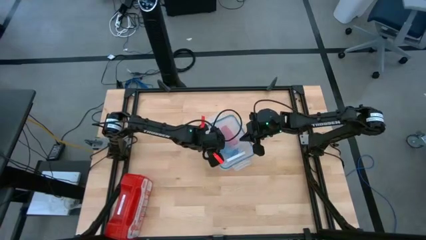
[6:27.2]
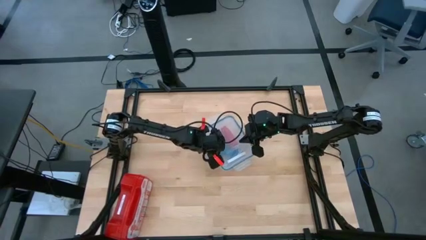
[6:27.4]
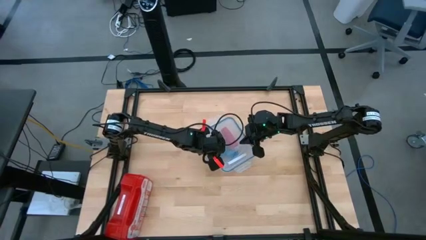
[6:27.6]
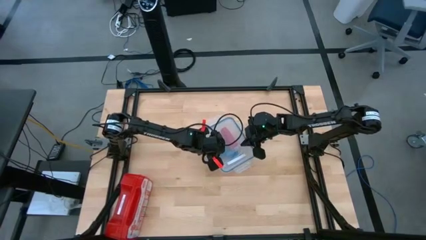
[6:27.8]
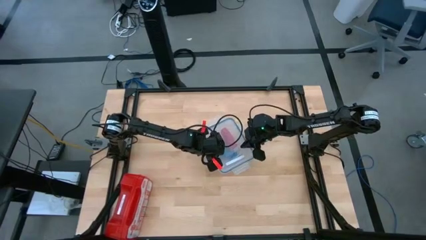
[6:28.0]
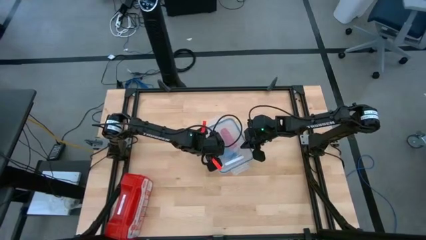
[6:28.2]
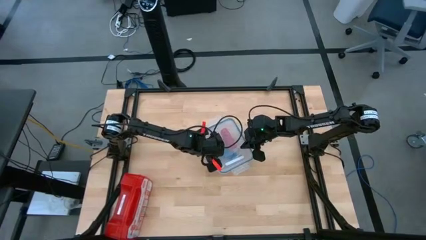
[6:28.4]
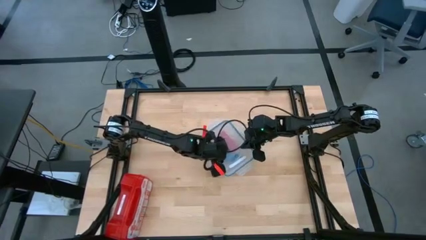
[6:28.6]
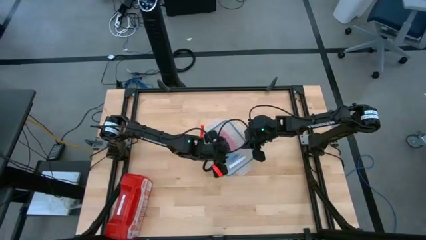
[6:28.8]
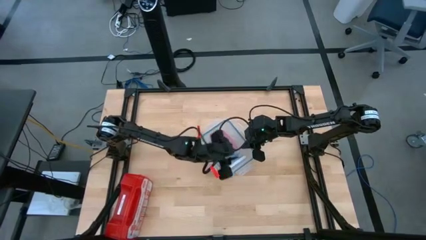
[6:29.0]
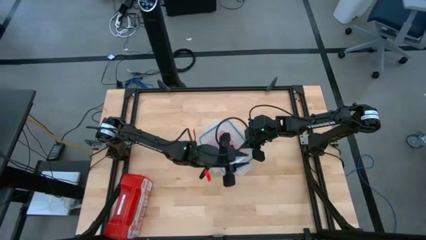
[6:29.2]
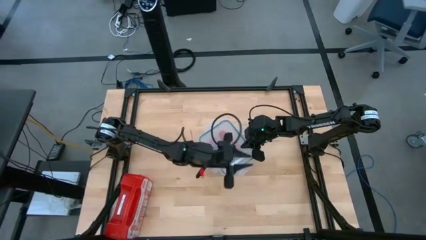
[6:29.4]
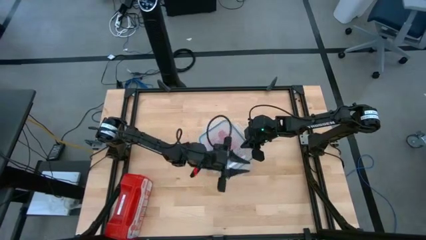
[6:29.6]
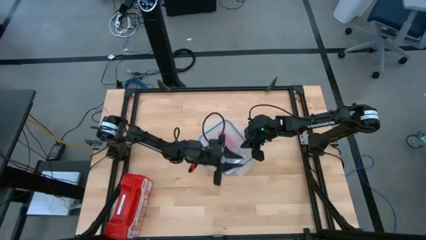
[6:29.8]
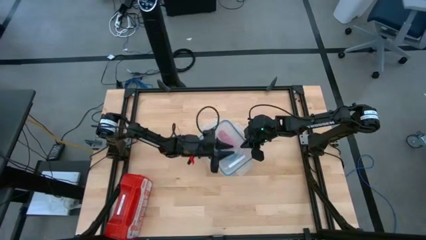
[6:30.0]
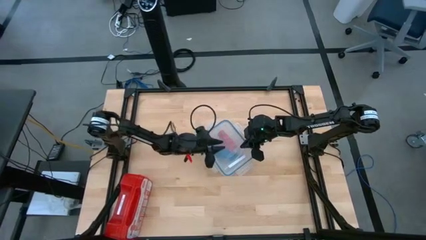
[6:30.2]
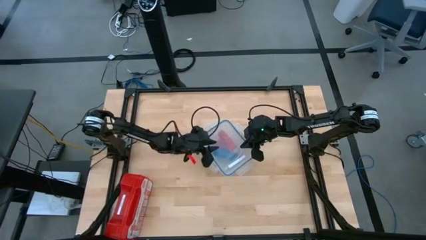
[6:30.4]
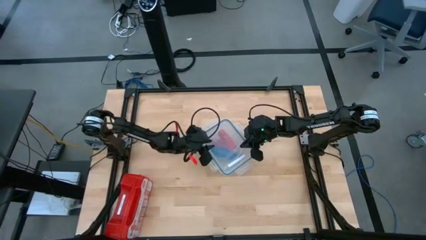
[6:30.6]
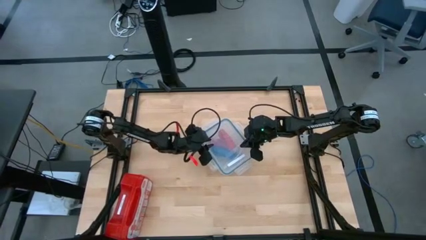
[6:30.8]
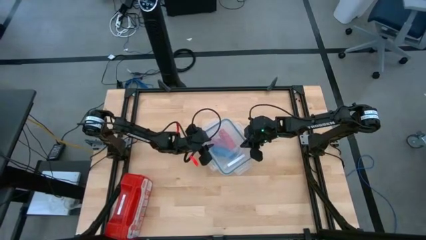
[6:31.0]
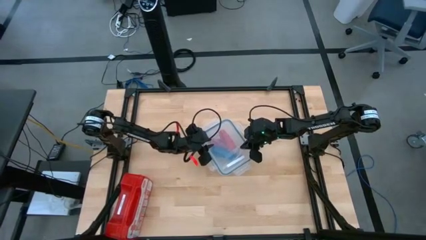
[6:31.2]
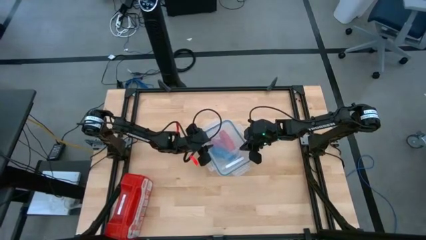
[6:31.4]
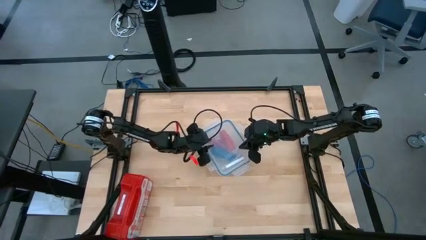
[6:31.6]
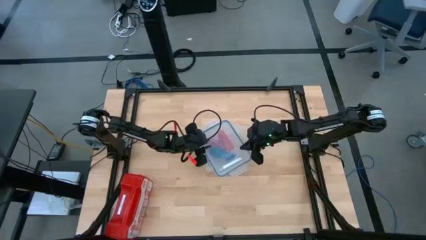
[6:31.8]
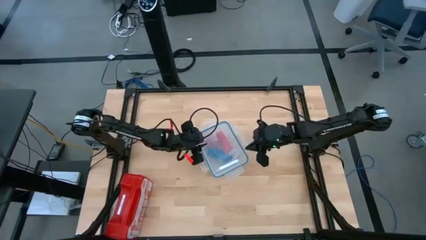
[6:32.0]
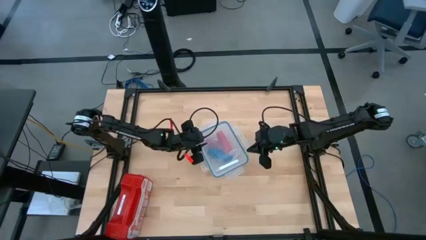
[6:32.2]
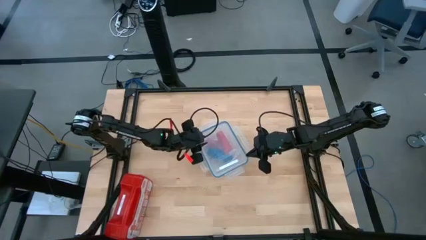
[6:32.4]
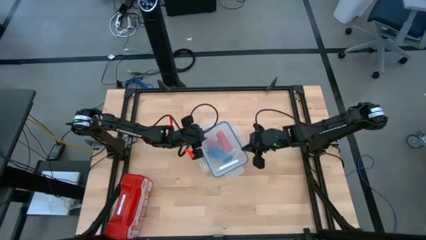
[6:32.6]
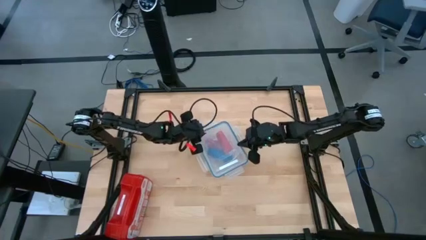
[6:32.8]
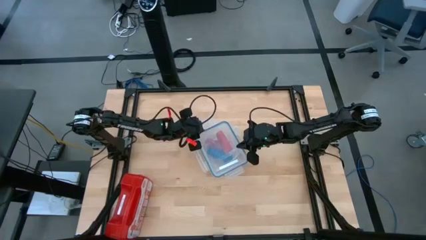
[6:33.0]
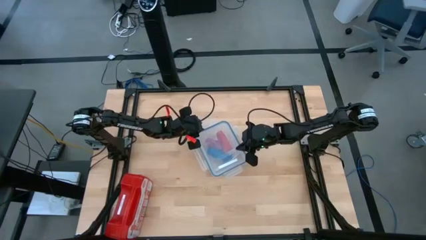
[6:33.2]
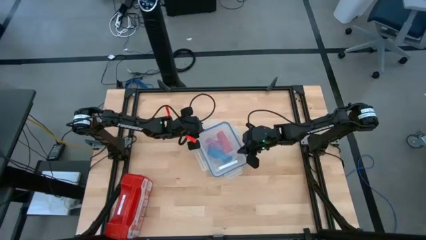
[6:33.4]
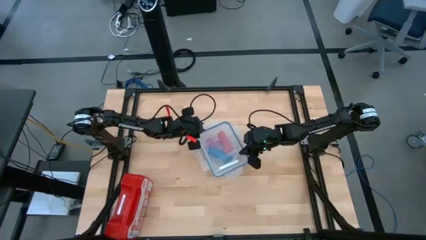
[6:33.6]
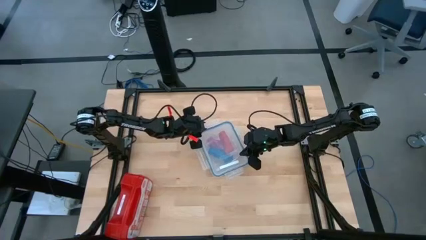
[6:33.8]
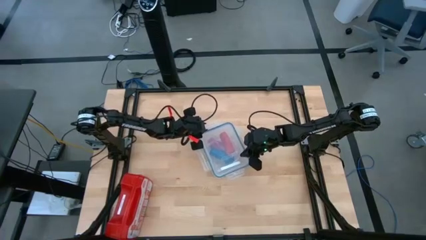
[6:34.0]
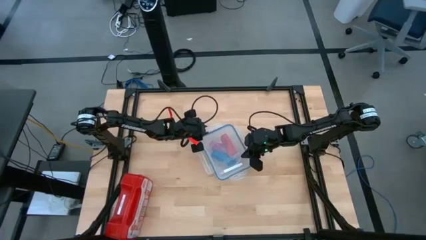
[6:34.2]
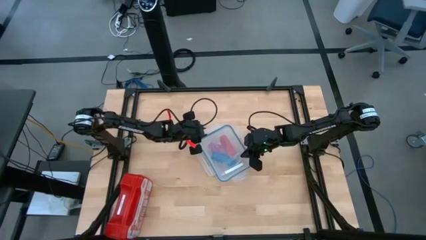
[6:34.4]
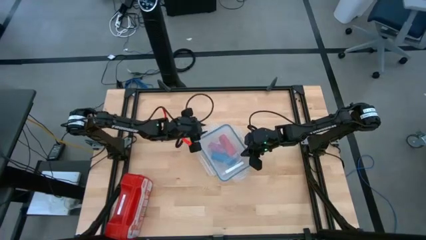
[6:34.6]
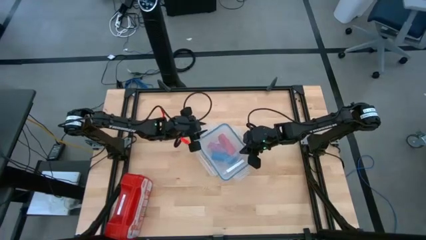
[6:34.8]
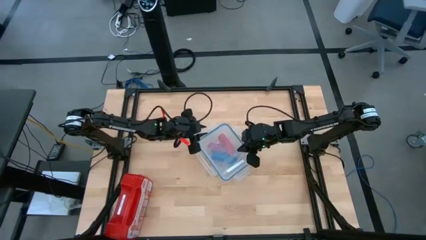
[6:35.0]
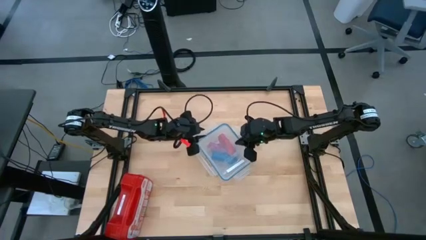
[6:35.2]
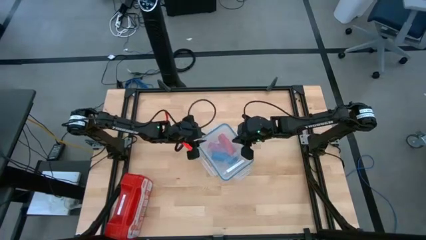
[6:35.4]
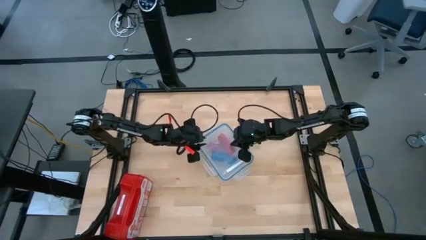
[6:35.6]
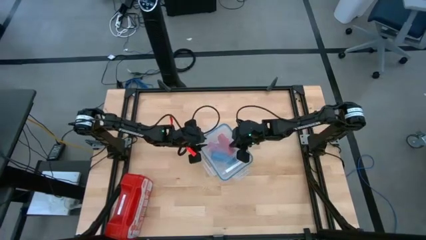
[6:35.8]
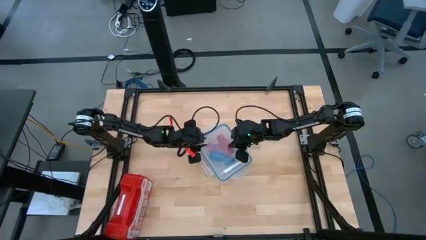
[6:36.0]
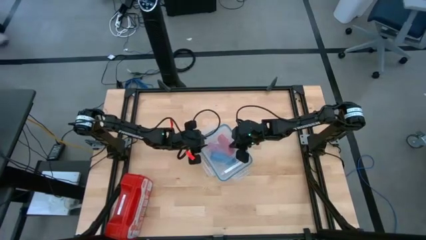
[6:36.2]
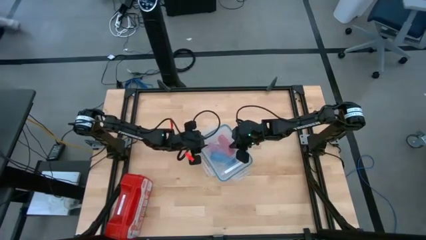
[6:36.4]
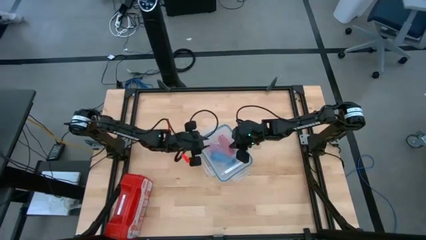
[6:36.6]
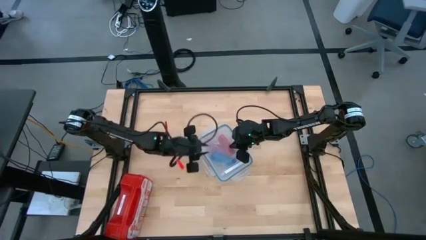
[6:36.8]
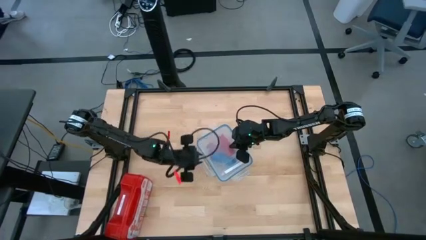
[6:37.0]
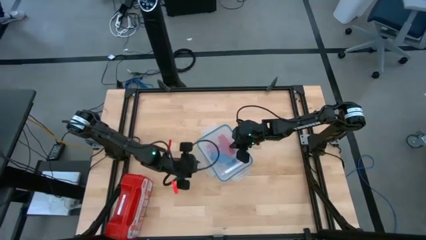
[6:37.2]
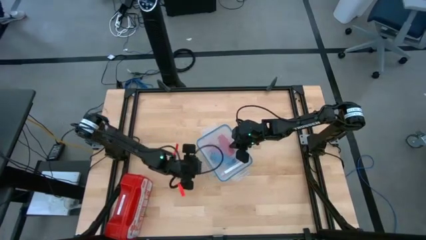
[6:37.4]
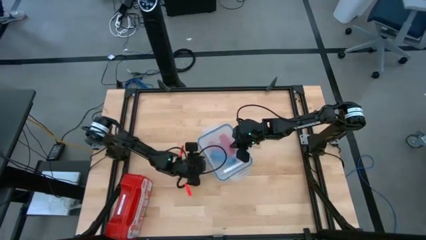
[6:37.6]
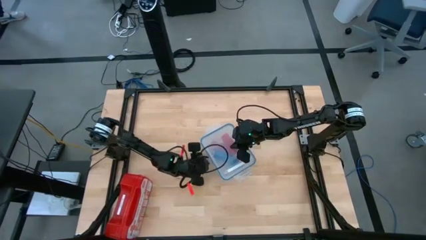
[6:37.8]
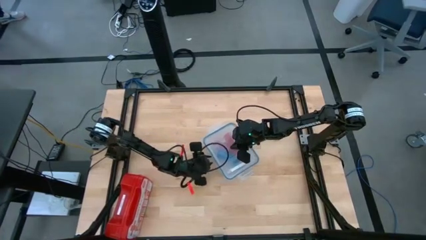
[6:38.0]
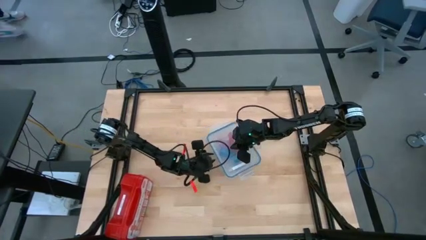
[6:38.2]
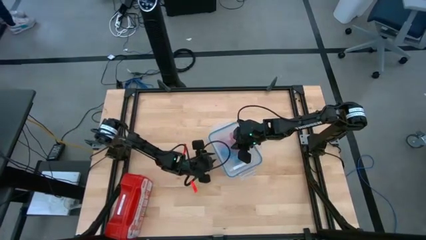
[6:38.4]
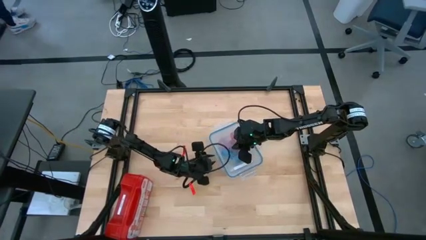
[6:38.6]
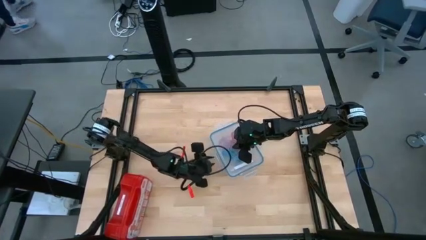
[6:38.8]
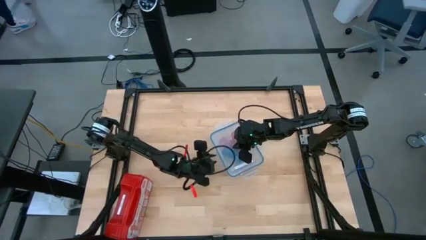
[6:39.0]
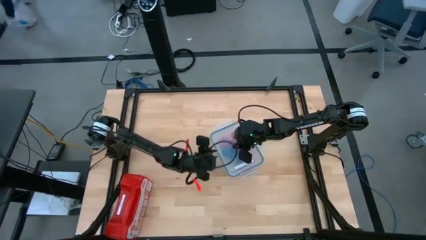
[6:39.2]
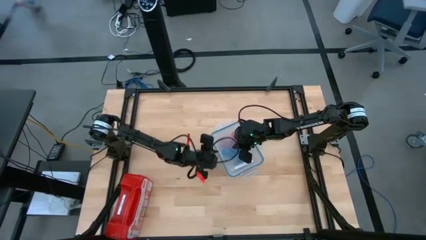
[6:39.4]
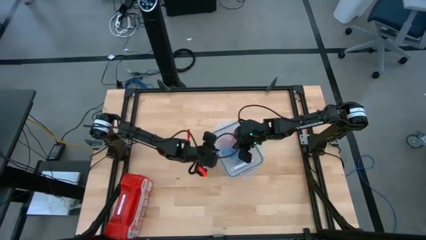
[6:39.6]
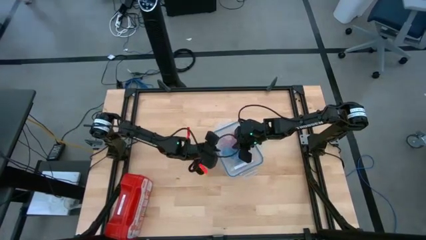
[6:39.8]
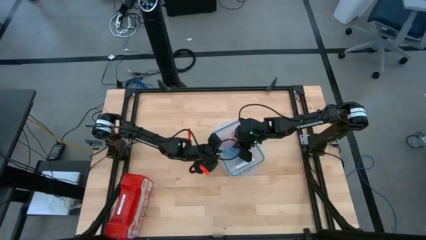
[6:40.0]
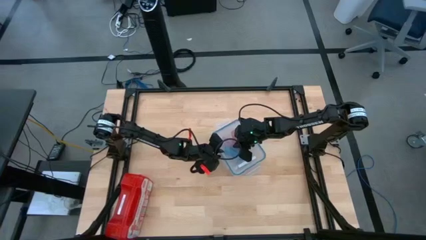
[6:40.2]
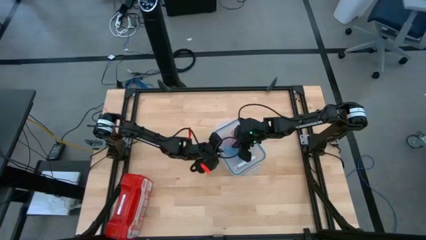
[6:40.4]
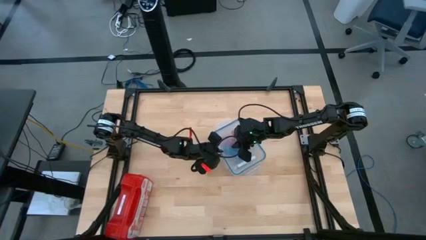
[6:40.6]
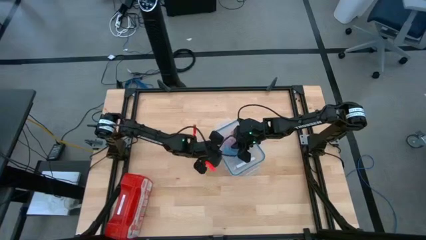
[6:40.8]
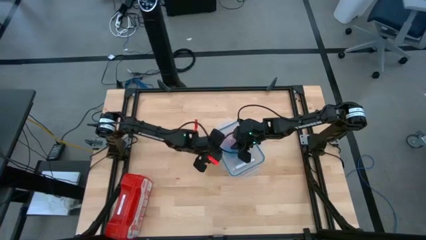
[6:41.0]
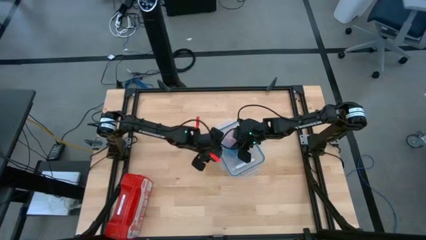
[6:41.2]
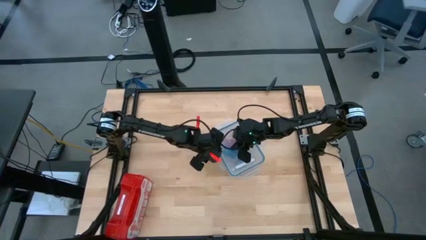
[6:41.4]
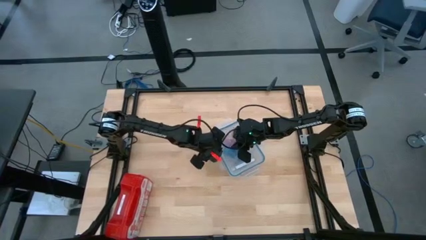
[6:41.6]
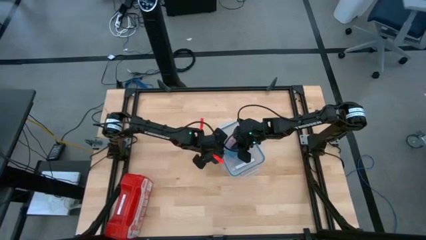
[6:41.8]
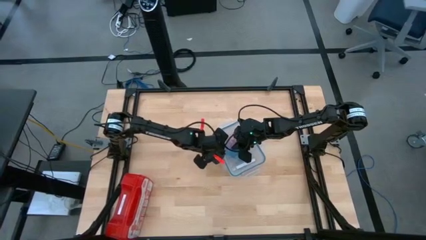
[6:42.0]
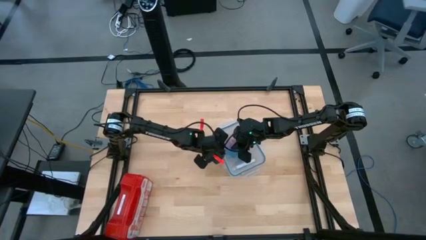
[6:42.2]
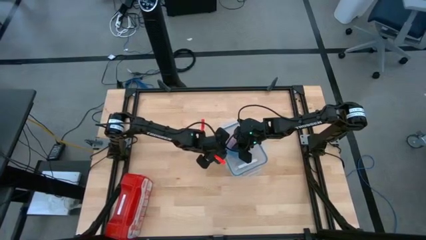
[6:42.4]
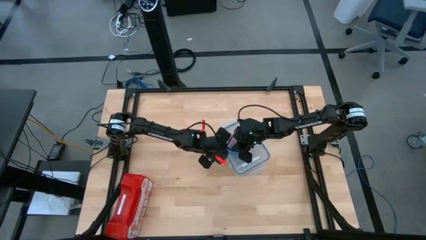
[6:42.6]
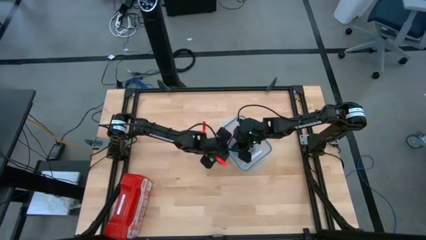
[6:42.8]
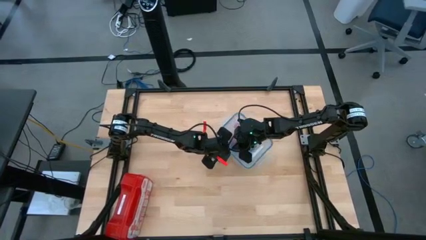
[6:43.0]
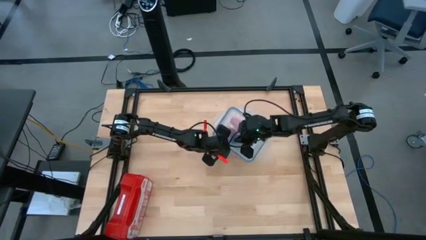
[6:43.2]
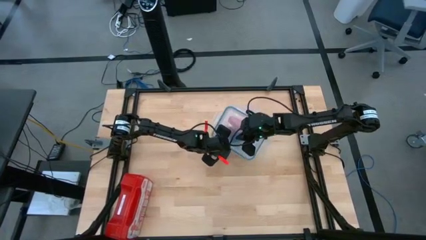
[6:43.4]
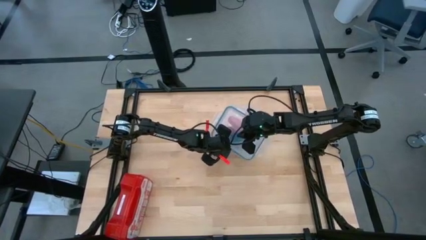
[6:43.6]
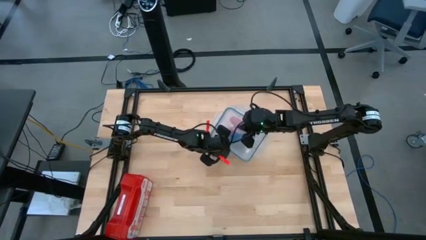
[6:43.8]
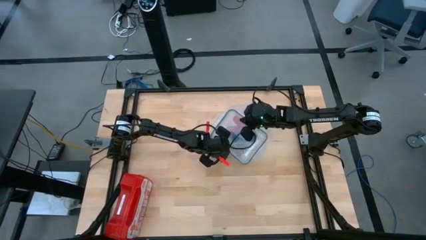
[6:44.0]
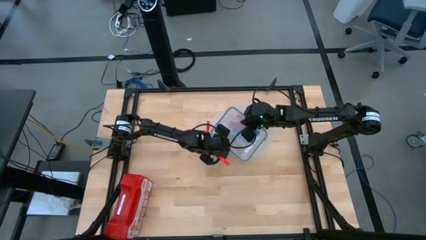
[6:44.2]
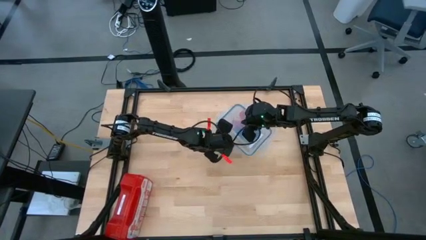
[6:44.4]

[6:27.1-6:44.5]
Task: Roll bandage
Close the transparent container
